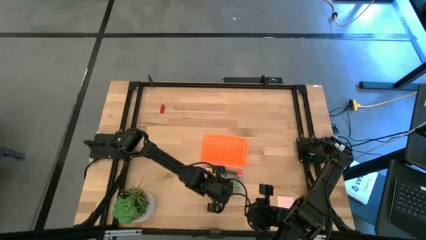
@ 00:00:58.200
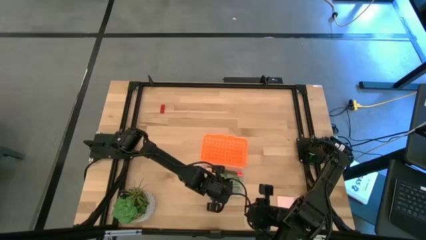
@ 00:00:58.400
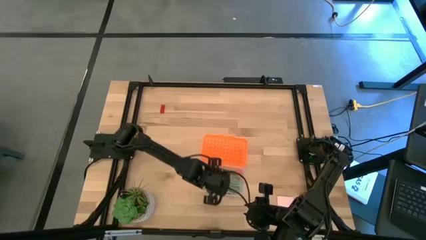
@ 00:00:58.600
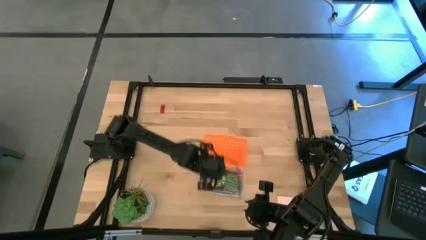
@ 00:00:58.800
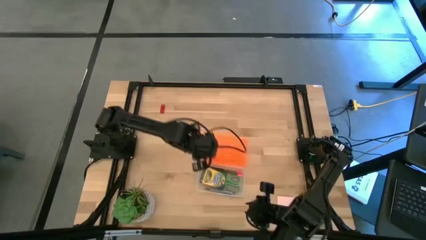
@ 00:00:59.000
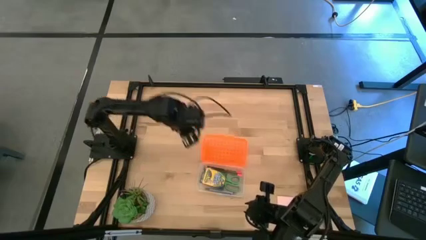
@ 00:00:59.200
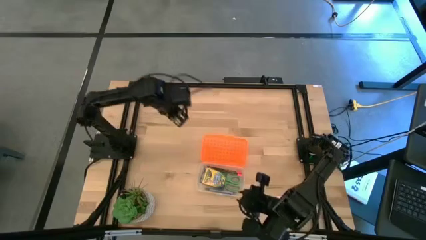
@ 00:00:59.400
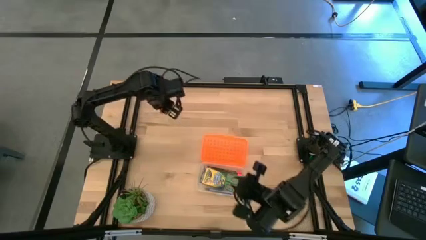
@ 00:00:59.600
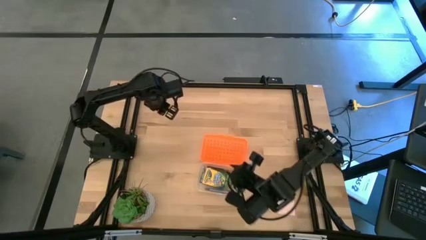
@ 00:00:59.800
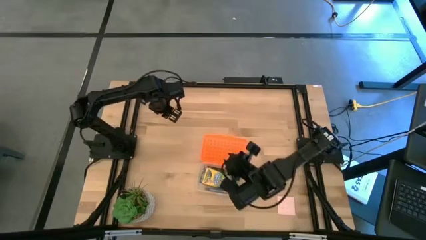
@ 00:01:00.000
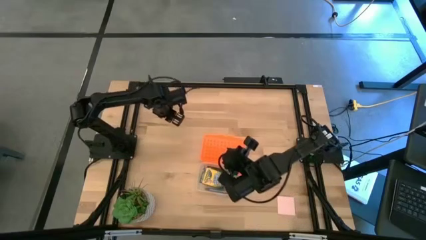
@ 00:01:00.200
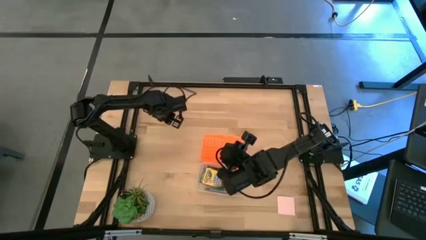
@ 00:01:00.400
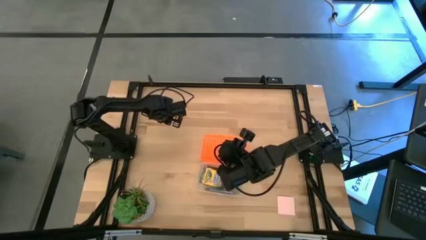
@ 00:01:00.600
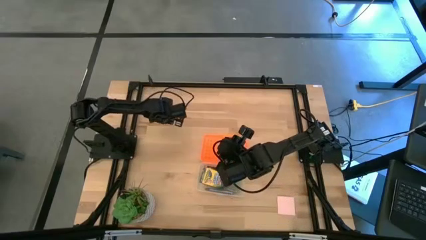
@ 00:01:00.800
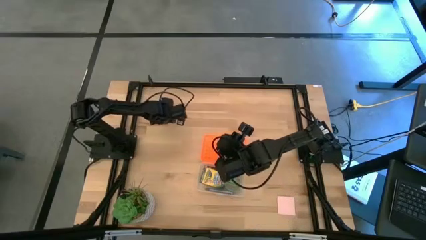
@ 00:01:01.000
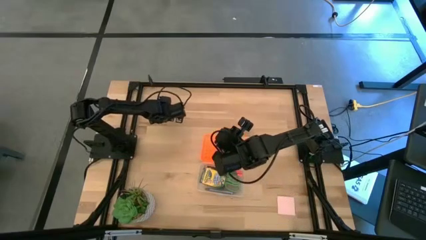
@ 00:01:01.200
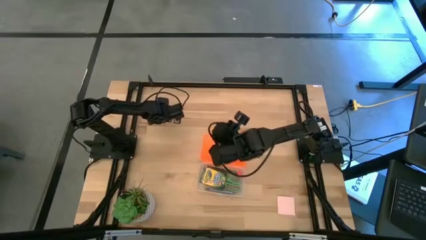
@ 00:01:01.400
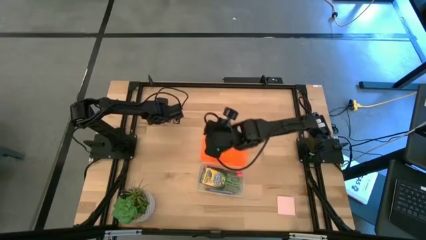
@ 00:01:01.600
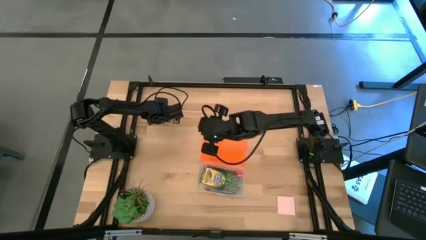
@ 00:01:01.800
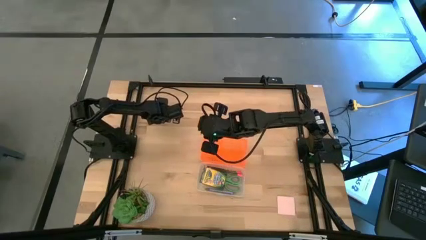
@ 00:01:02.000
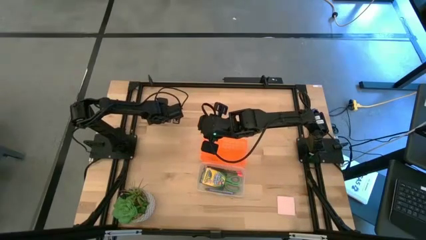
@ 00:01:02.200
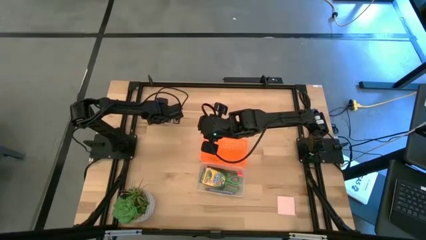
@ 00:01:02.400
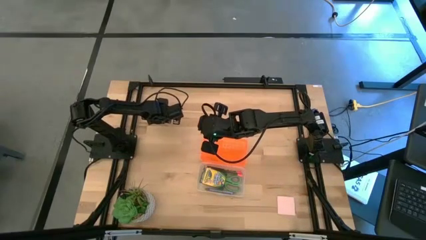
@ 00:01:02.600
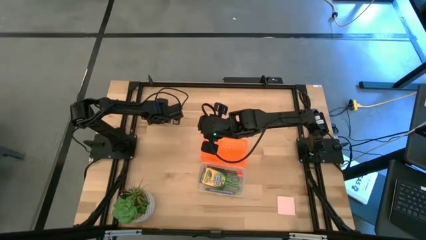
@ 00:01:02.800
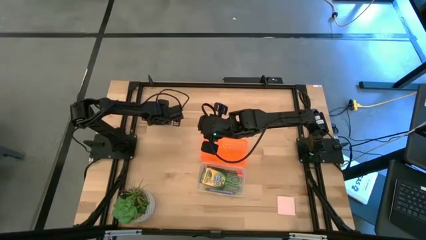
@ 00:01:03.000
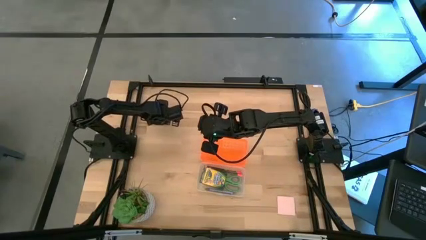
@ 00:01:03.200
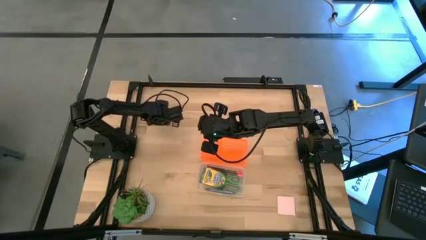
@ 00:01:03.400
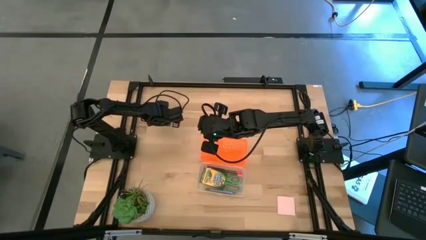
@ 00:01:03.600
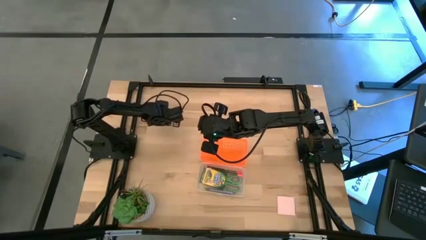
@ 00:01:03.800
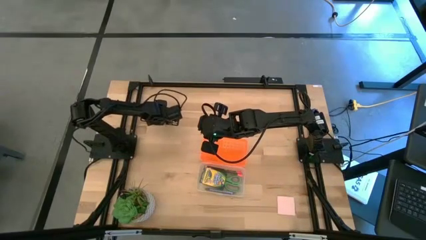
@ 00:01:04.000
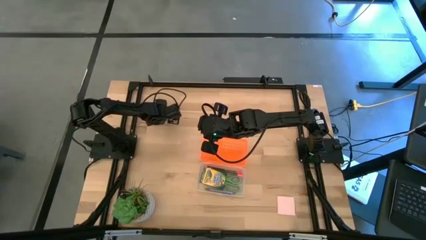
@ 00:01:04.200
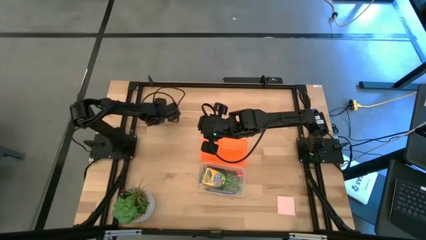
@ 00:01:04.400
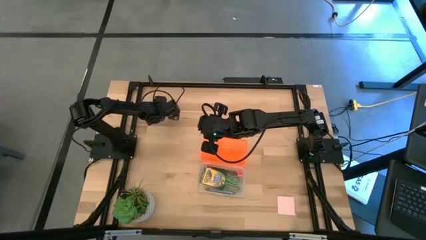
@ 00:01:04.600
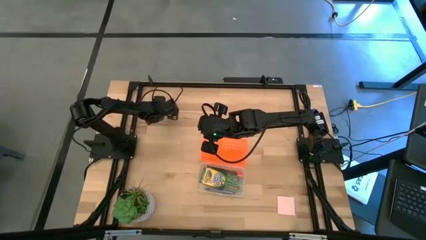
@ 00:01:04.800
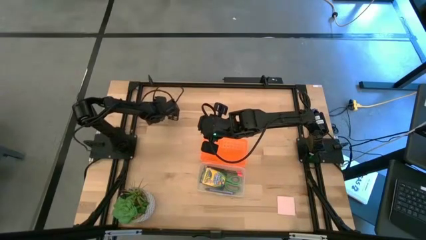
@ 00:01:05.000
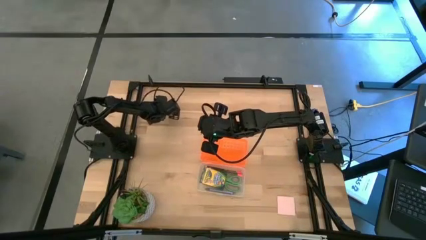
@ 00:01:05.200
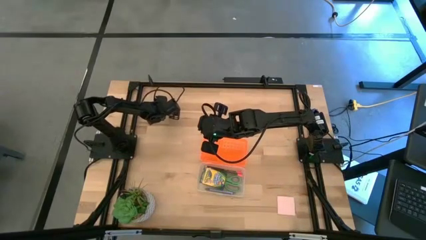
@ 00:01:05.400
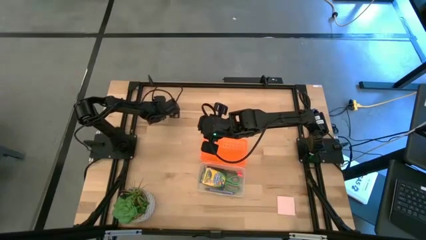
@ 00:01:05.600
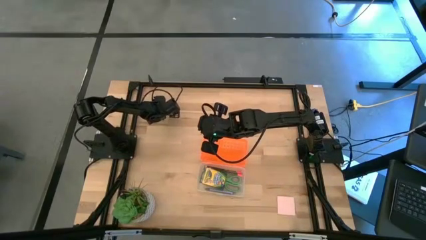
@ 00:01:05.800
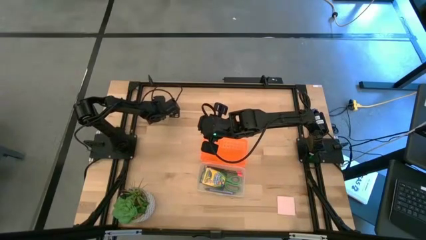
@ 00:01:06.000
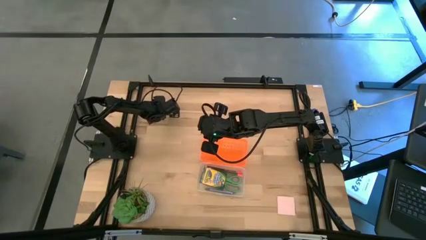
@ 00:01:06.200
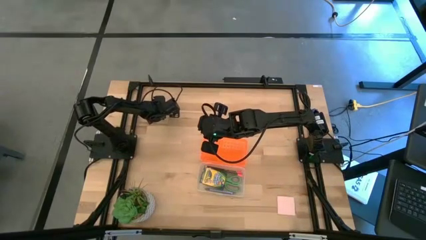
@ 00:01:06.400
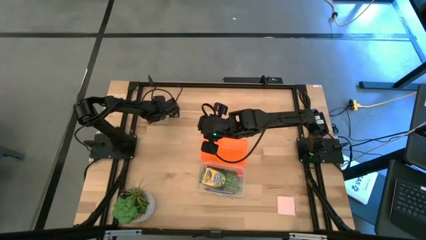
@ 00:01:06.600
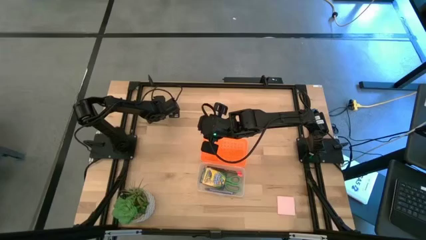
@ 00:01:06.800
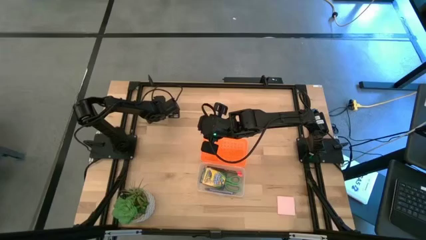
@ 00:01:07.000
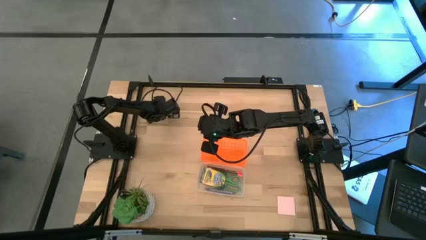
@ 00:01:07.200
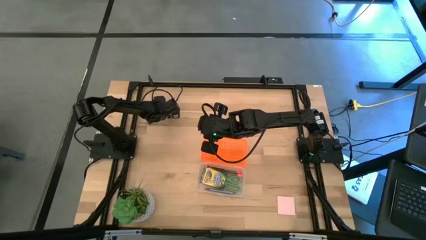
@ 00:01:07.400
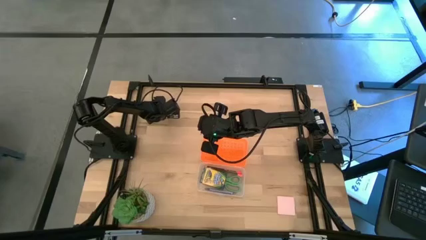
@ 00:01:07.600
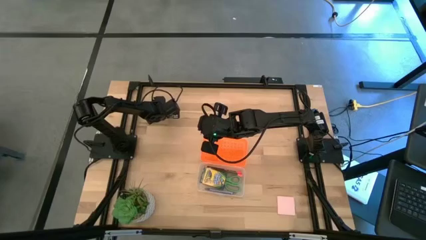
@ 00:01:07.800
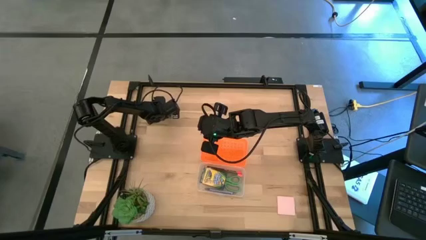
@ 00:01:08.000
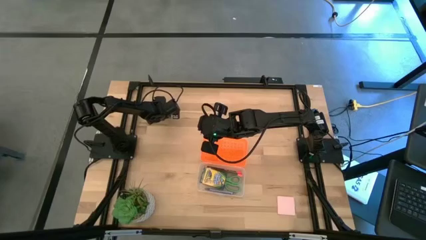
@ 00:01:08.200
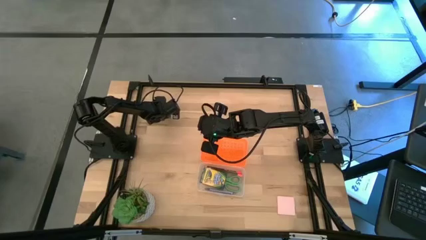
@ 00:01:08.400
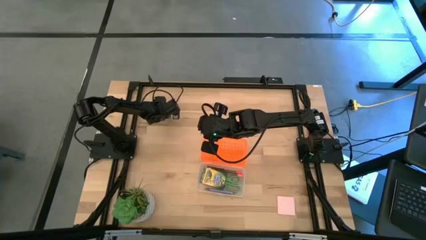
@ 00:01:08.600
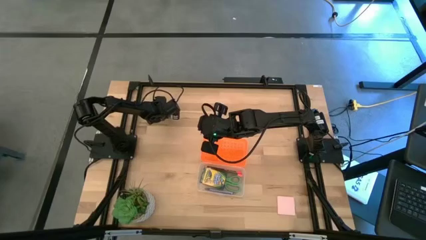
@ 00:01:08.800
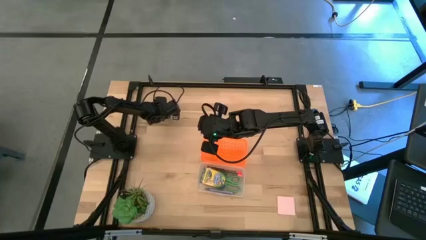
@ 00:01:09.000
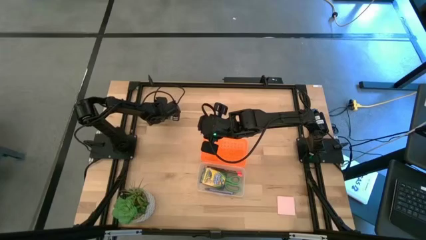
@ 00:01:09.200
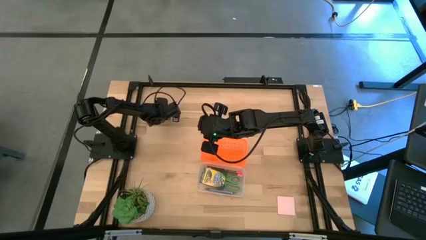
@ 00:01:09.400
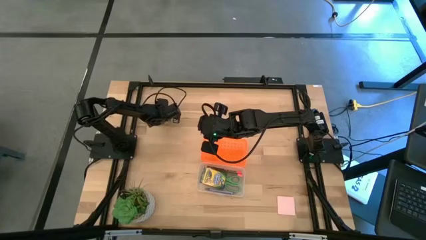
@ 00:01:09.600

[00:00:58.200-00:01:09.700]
Task: Pack school essentials
Put the red eraser into the orange supply box
